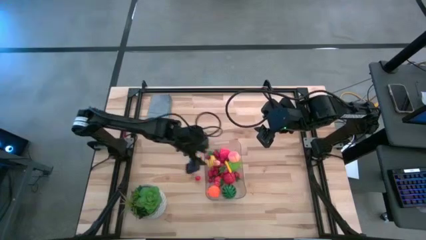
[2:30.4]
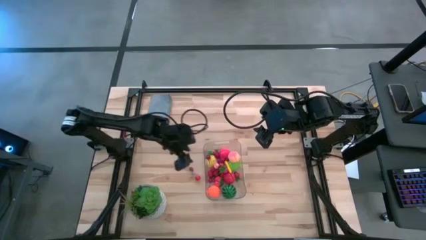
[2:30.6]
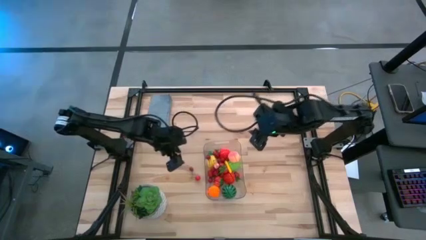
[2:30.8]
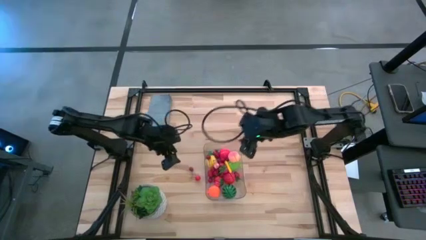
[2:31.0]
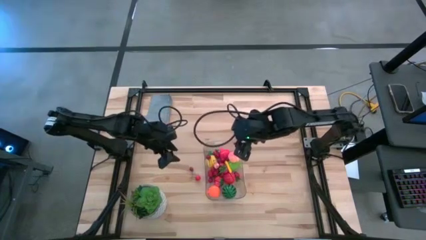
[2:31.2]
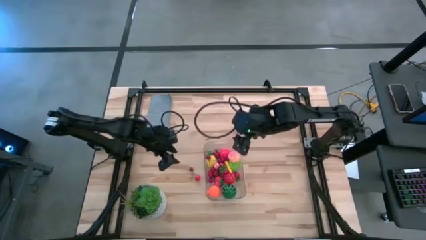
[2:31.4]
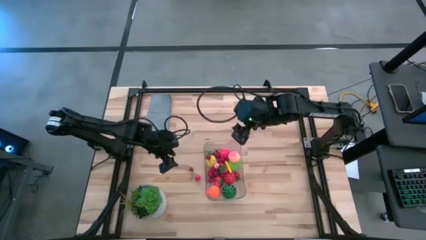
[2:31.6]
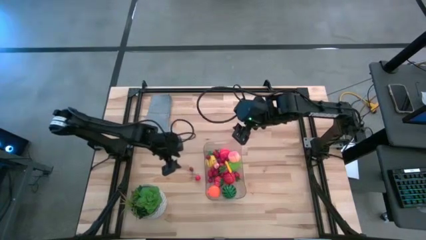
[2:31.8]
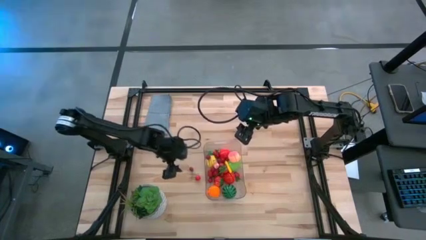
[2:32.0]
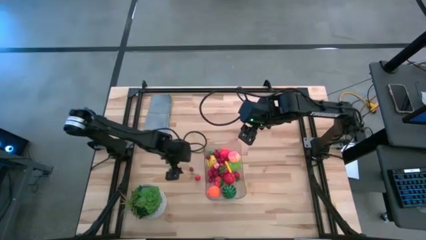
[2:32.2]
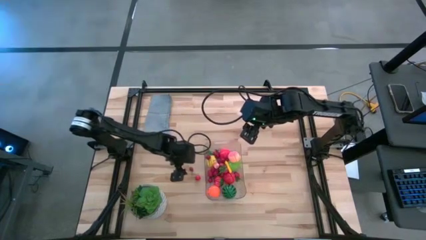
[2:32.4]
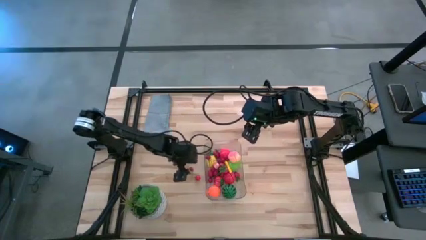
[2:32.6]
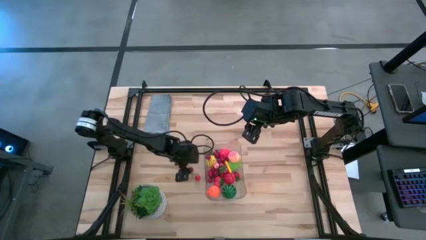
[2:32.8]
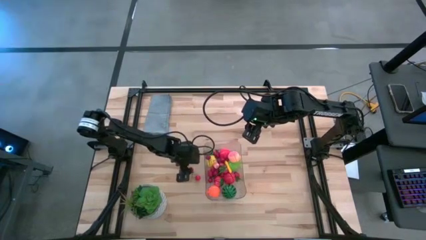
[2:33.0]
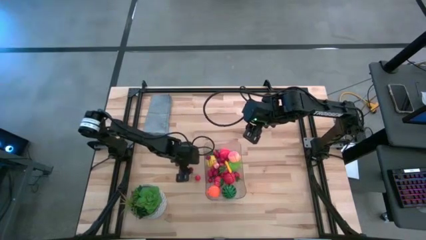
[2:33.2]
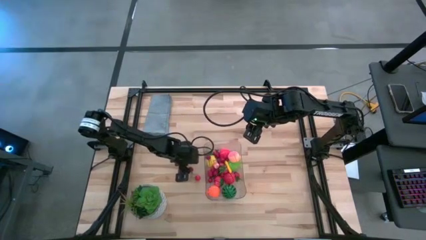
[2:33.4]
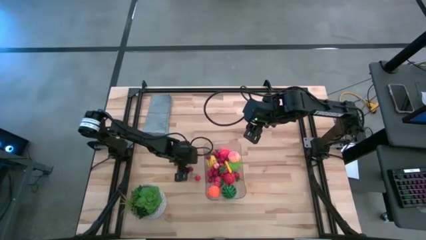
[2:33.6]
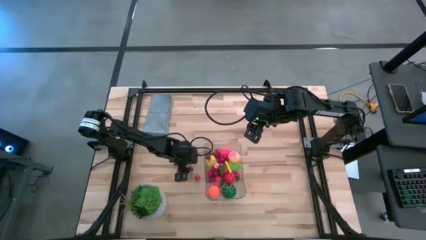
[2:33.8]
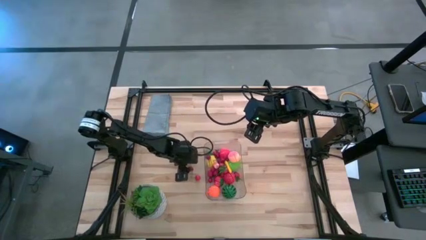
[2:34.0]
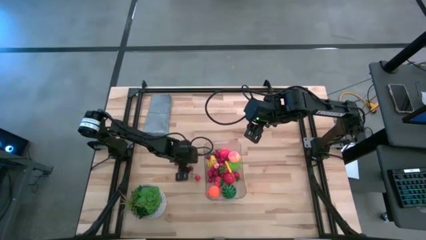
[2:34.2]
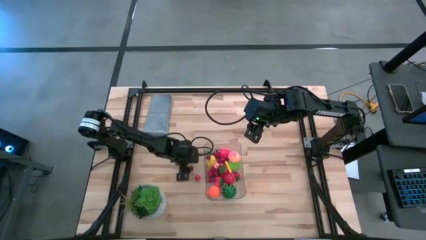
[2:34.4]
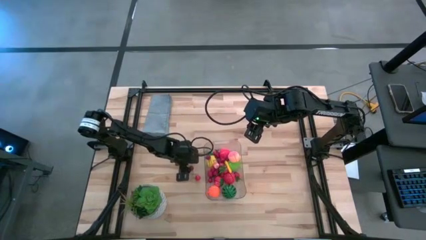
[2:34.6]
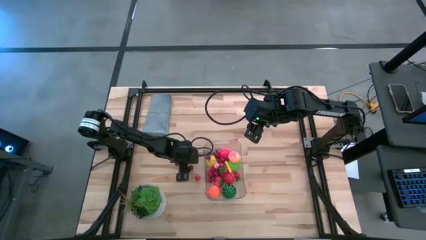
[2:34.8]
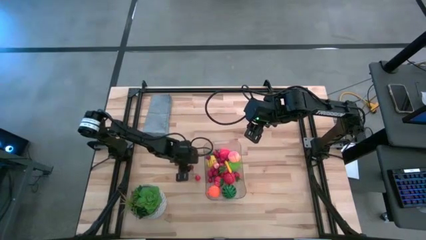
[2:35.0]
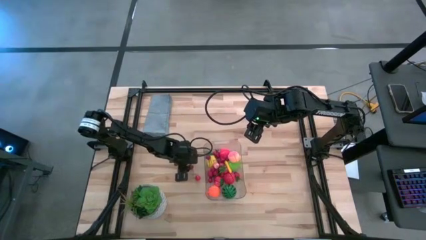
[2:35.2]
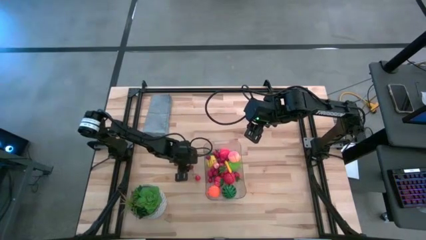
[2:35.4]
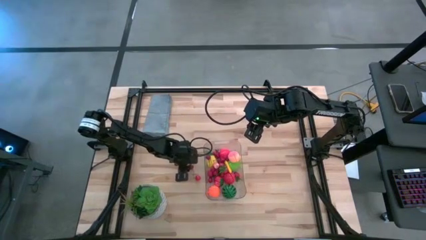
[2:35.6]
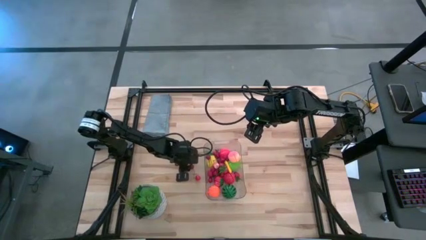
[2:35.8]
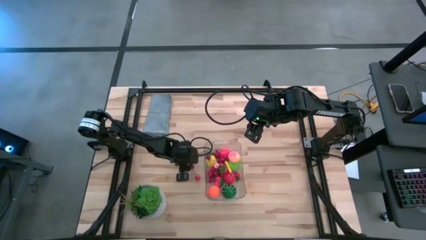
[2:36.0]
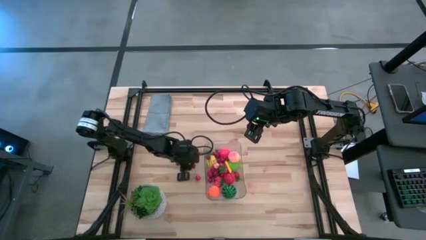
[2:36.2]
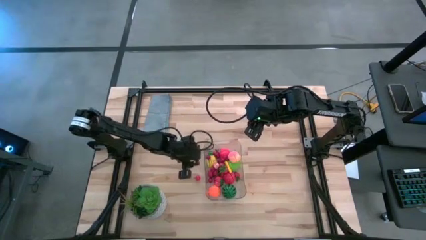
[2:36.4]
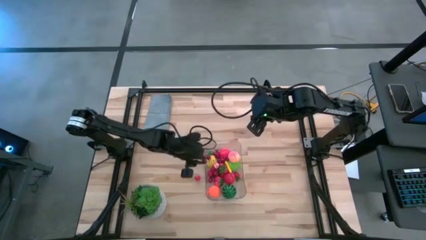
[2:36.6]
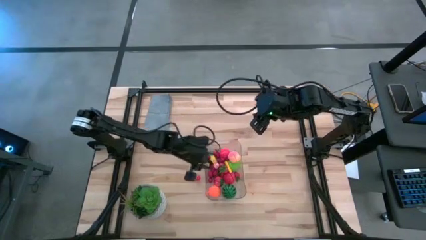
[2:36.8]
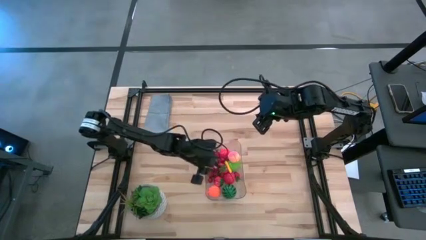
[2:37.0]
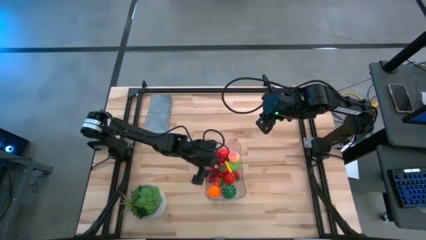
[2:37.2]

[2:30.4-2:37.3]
Task: Pick and placing Produce into tupperware
Put the cherry into the transparent bin

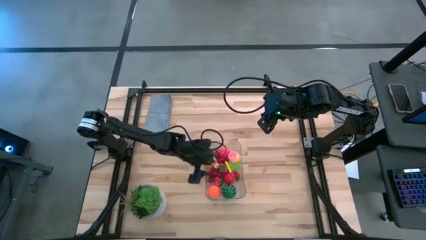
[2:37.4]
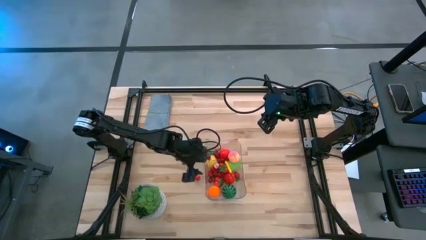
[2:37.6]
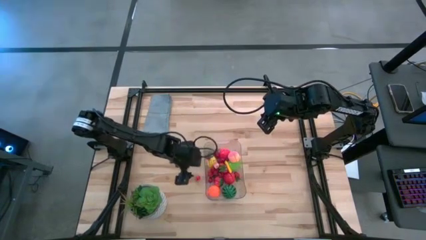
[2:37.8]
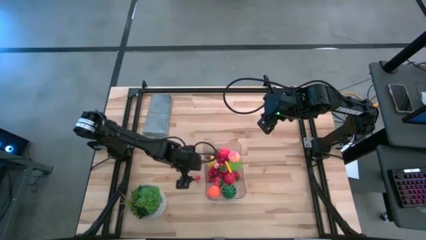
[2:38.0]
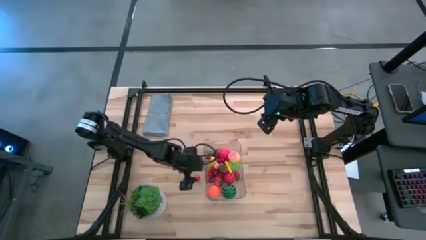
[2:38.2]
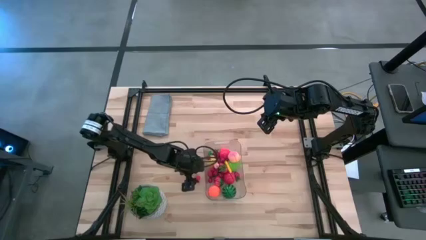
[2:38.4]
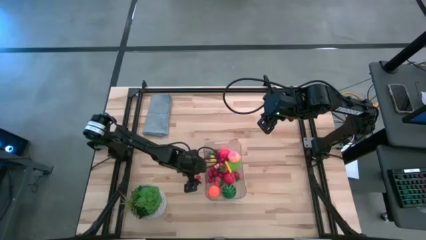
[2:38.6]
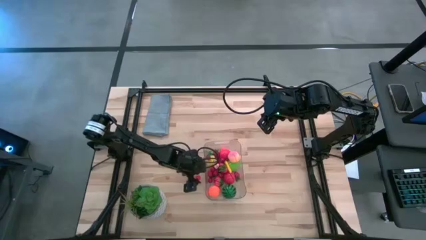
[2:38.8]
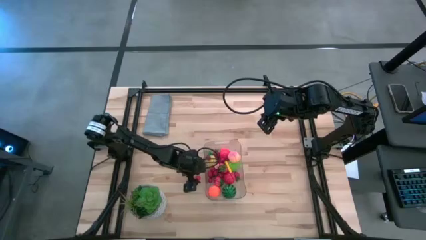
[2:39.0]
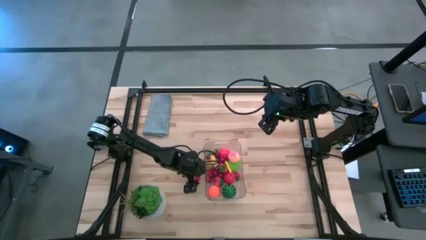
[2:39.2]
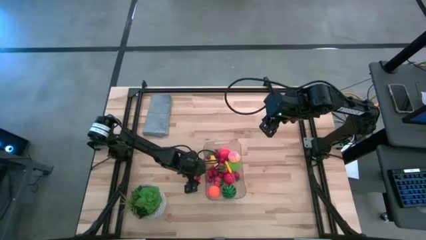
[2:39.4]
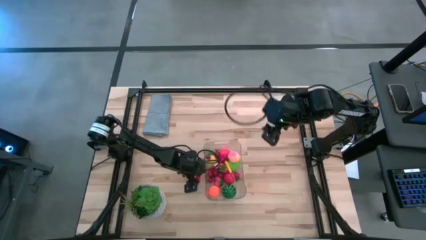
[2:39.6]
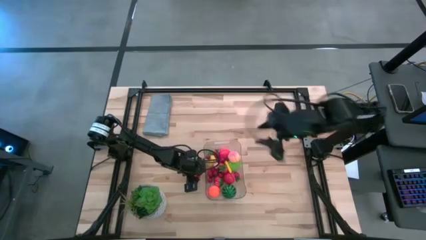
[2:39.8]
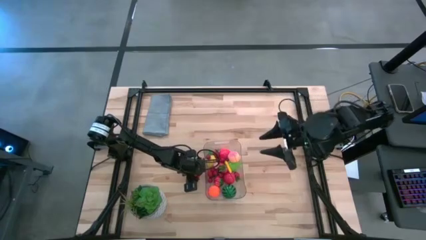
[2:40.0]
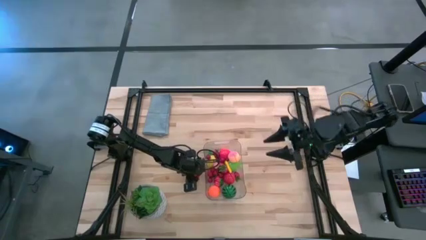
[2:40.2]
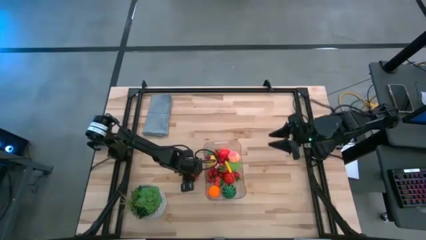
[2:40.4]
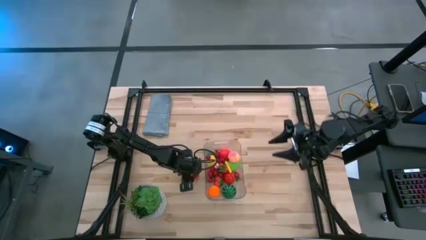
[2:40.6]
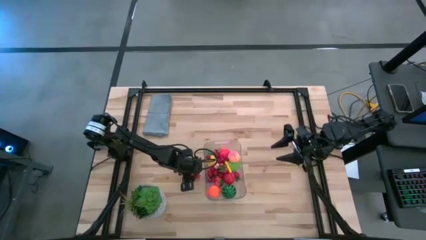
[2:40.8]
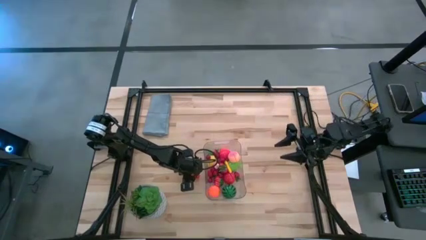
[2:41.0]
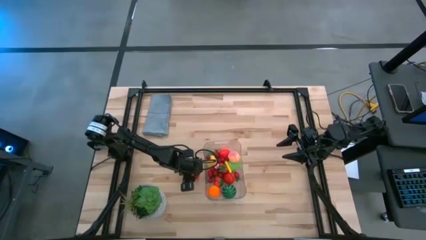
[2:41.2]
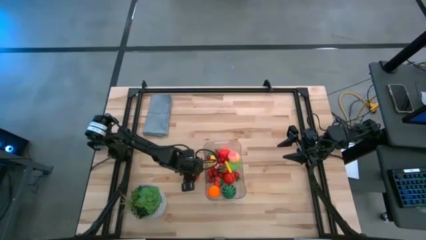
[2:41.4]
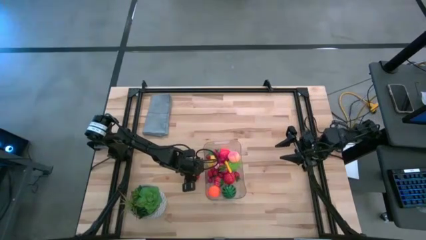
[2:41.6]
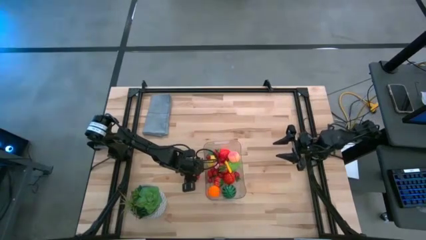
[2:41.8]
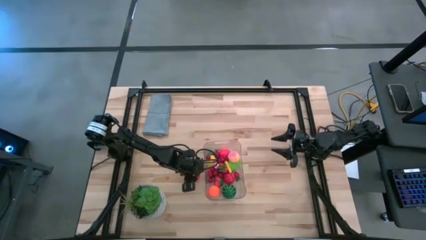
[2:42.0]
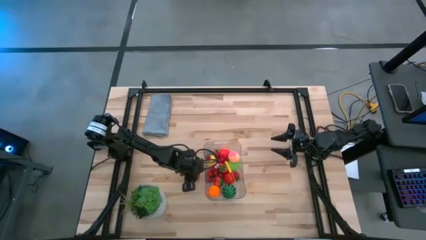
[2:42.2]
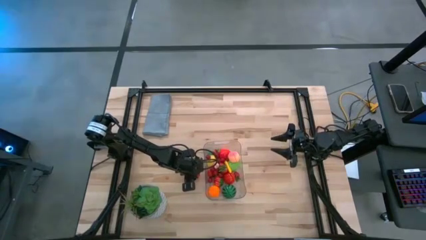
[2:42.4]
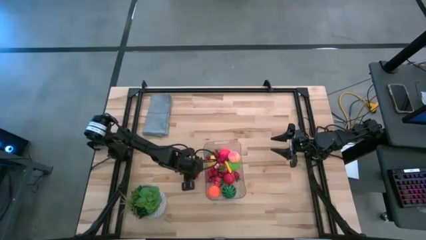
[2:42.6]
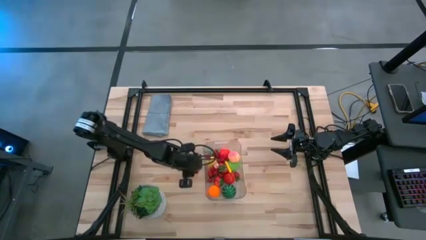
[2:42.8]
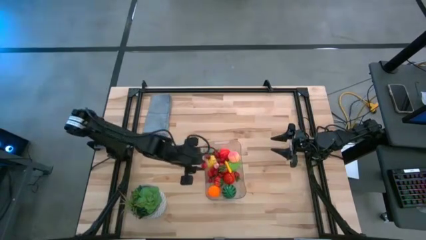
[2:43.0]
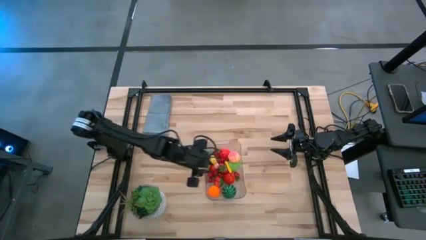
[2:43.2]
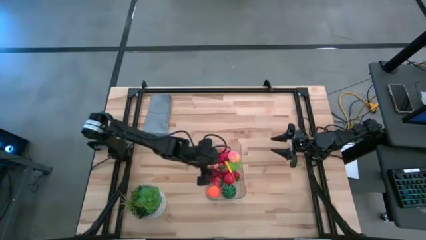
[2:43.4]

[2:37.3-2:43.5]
Put the cherry into the transparent bin

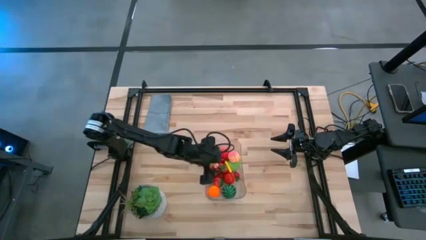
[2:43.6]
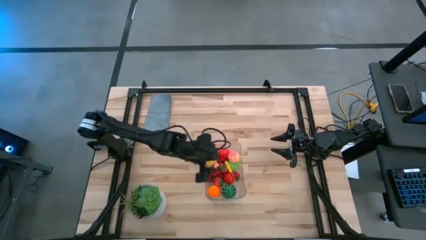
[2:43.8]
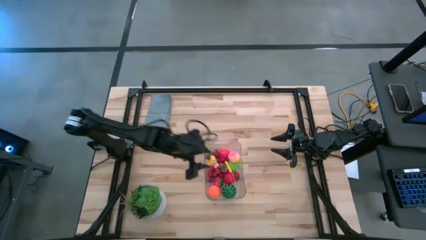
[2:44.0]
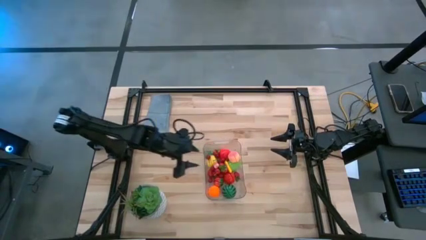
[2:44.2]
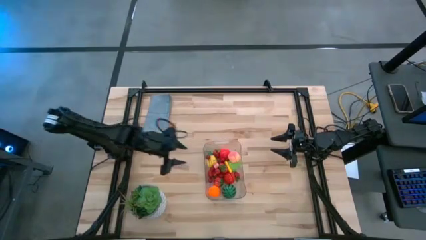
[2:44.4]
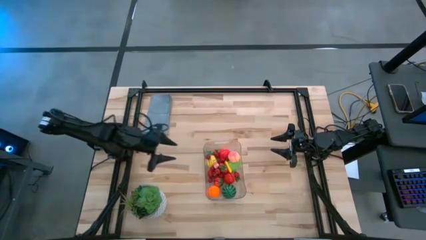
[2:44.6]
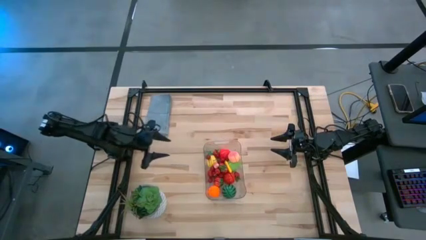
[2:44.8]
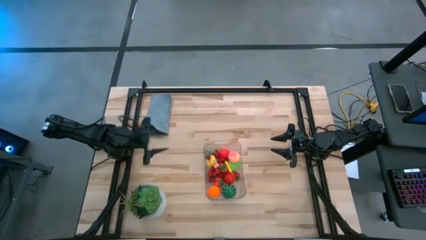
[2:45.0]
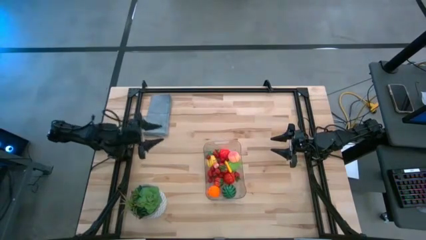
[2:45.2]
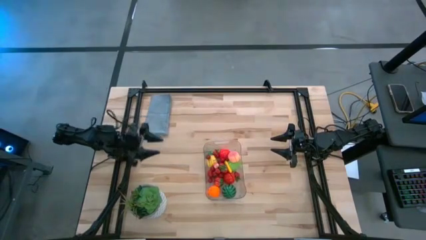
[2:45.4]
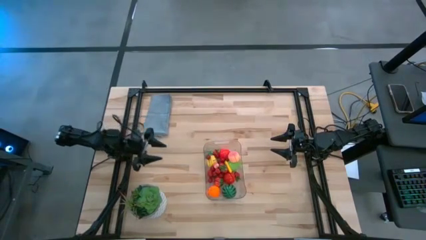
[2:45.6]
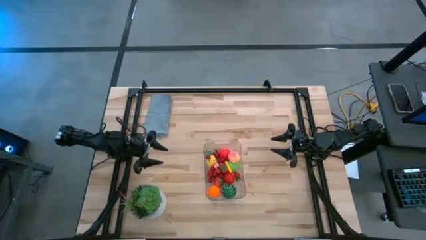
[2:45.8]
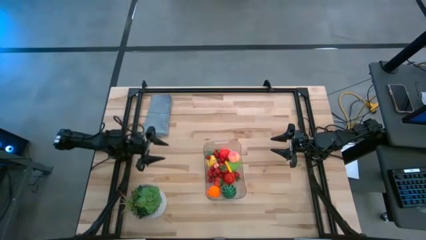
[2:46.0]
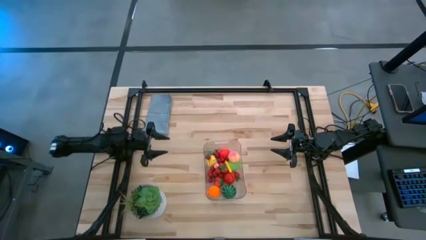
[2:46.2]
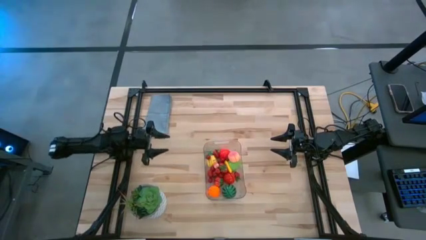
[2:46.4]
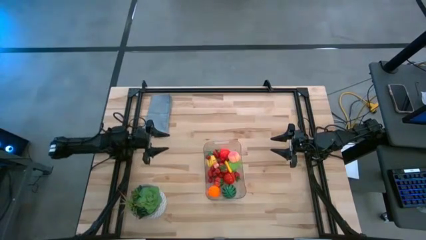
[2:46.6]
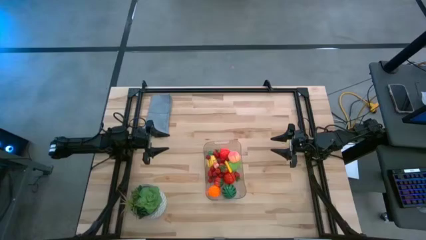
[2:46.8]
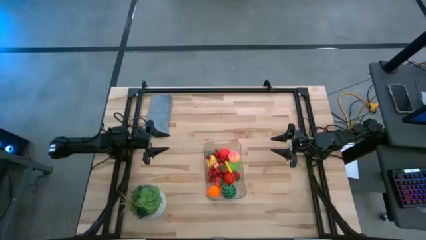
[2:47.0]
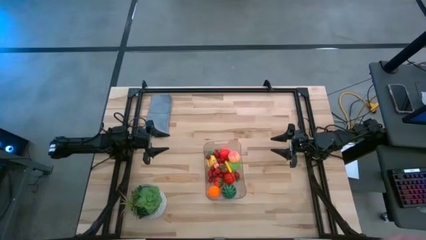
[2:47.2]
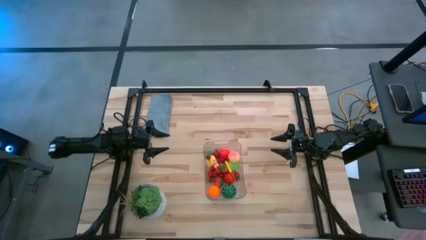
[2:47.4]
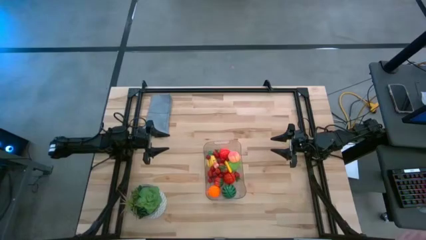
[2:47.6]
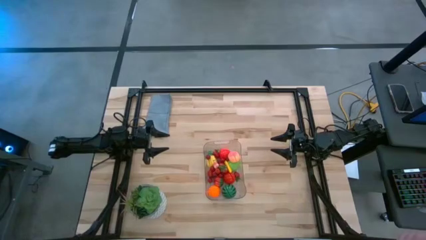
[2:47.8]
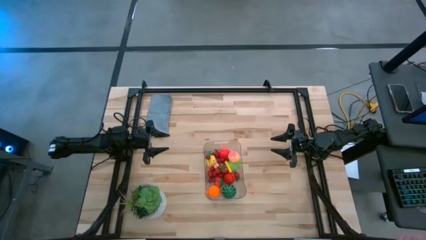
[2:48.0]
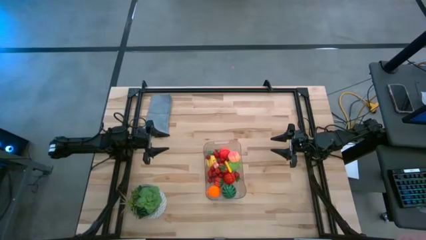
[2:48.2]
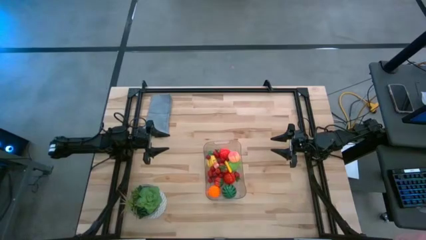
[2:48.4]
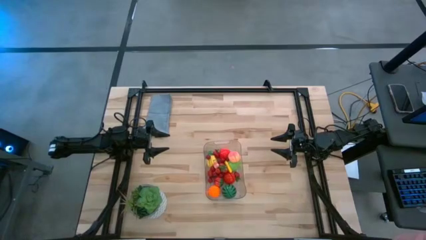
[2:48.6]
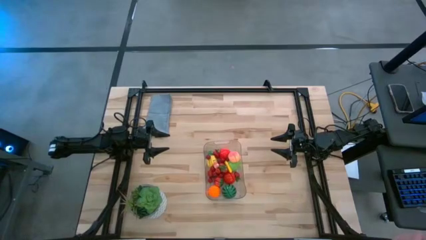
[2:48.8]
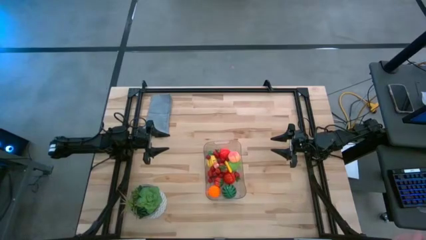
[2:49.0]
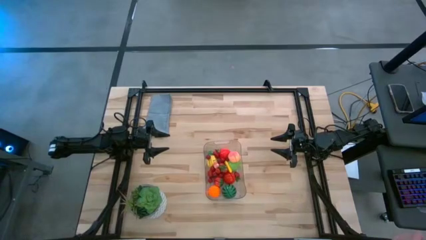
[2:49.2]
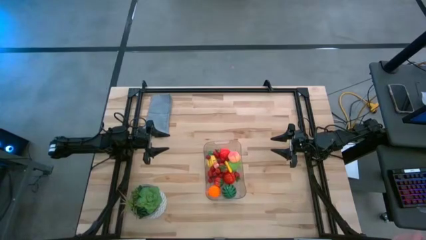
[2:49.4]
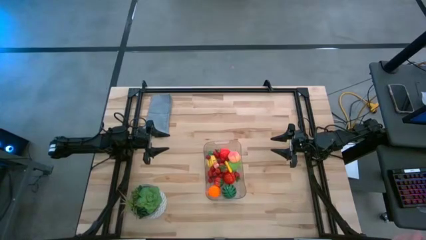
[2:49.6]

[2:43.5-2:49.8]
Return to Home Position
